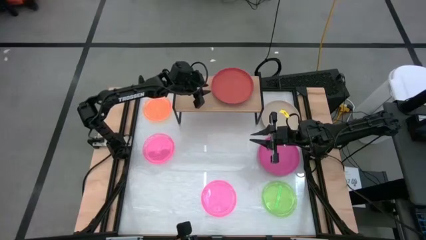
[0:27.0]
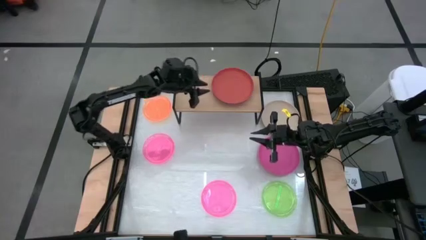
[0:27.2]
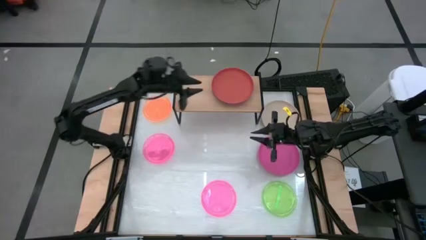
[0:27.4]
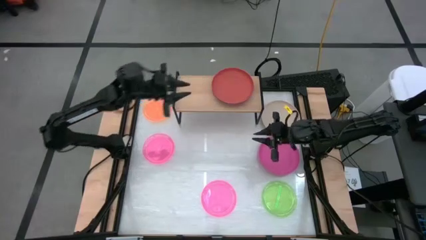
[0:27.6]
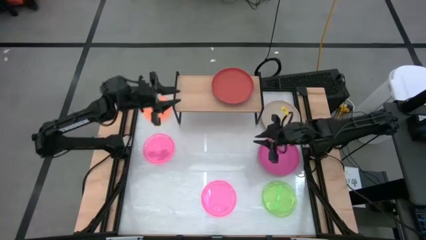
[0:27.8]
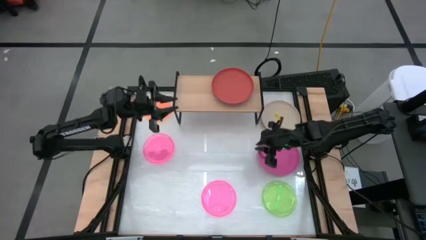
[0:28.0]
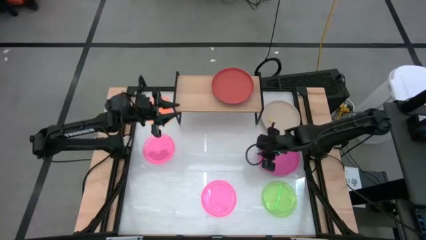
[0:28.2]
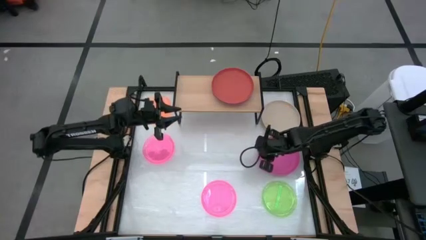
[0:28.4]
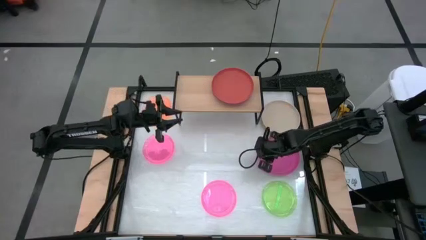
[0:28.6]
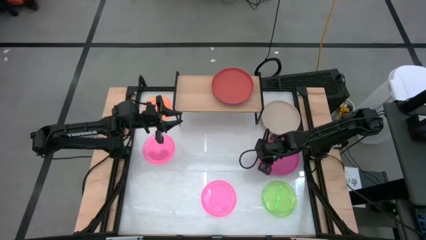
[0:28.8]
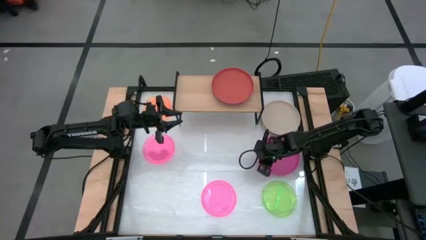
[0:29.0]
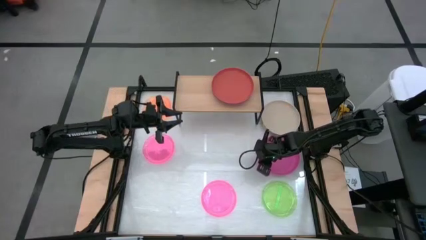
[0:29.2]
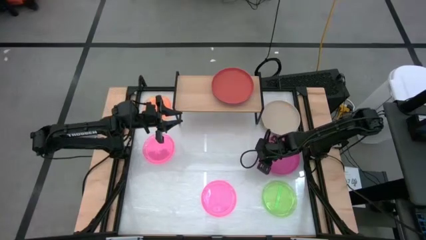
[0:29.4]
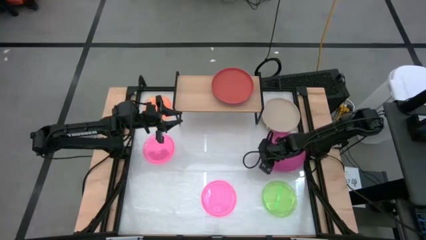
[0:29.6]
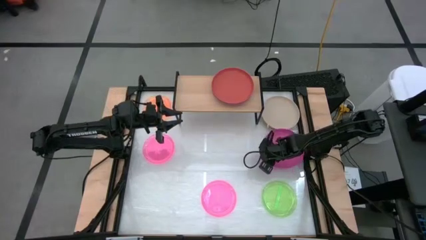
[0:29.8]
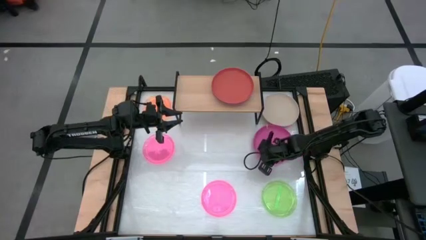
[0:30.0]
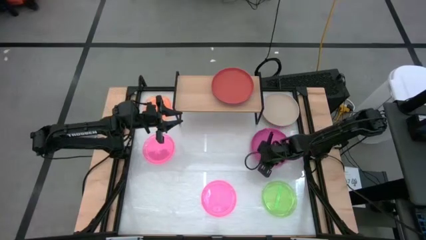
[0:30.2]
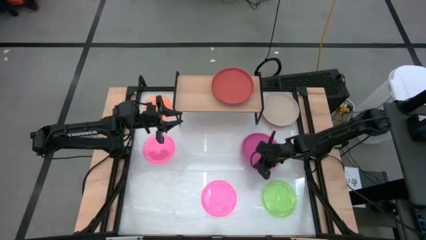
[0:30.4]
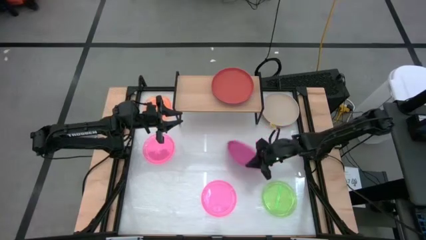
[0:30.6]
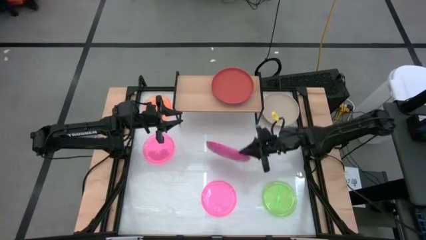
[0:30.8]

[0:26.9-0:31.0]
Task: Place and stack plates onto a shelf
Stack the top right pink plate on top of the orange plate on the shelf

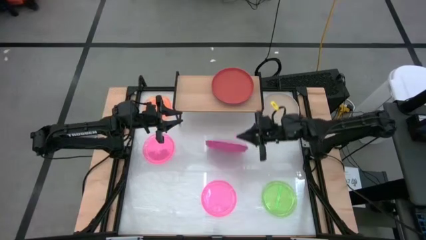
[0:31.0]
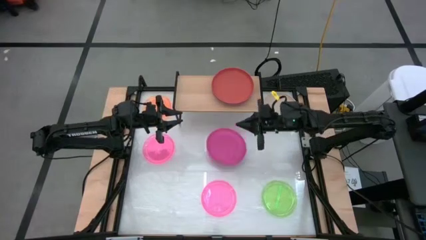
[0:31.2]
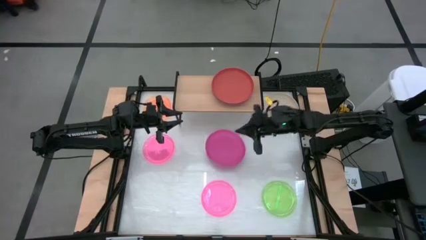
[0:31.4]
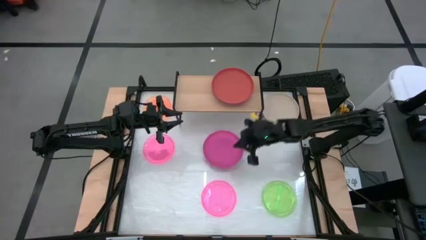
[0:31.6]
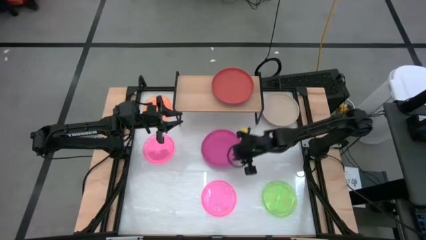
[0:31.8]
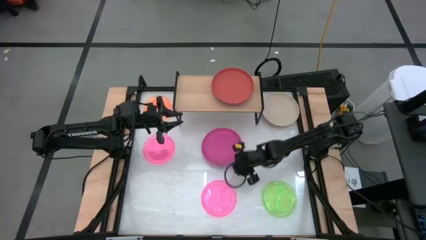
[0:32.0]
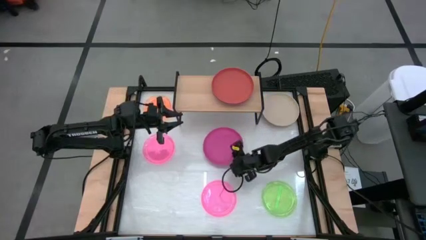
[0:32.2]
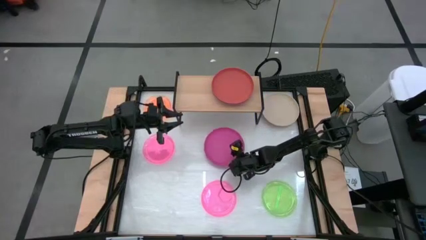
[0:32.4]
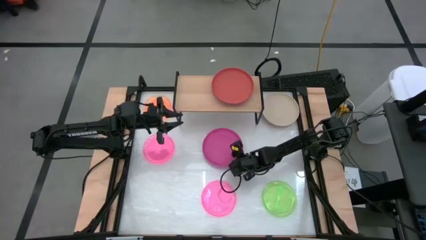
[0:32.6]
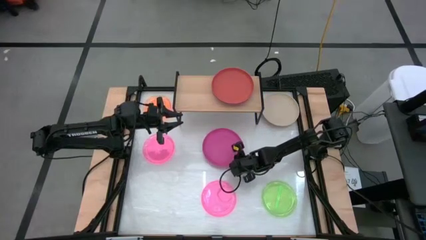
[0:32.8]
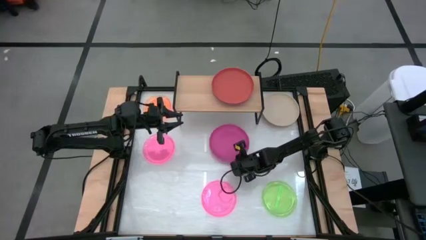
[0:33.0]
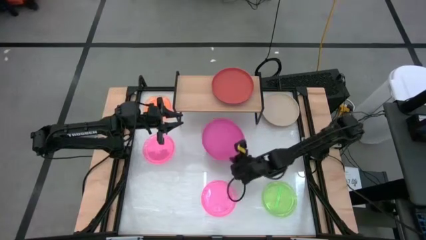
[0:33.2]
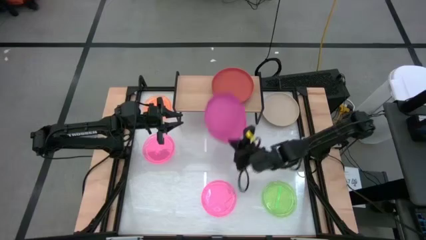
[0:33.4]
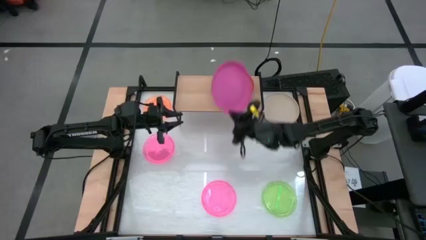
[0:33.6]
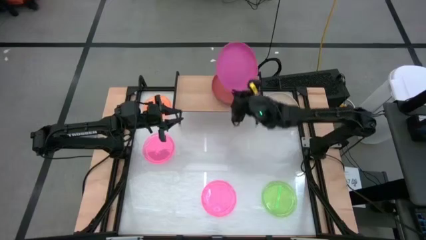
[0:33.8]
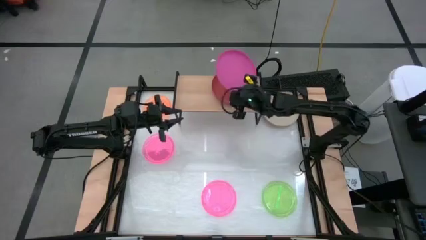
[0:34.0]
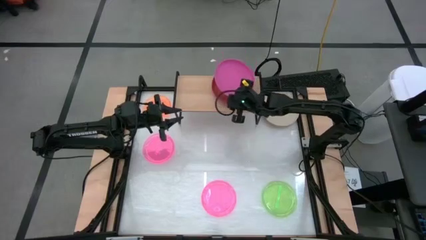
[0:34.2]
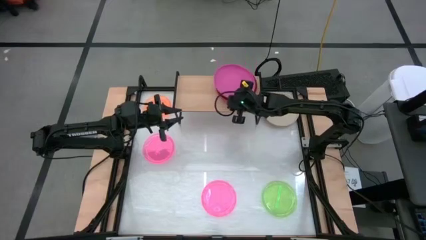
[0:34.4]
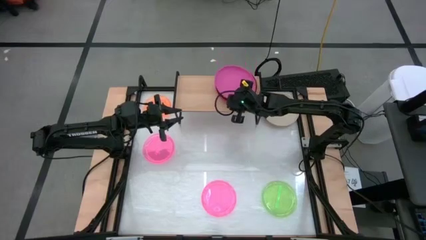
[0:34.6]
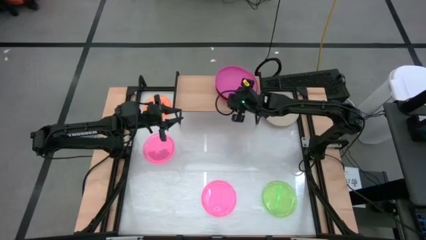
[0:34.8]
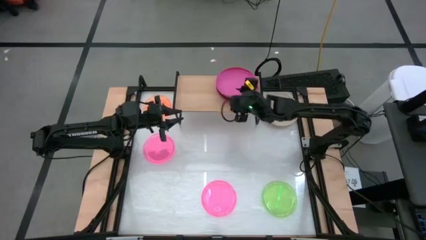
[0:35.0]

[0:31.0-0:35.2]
Stack the top right pink plate on top of the orange plate on the shelf

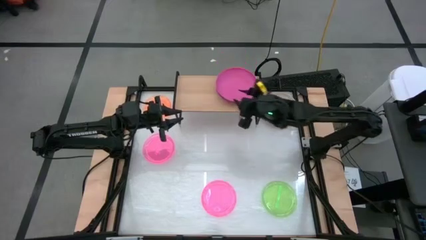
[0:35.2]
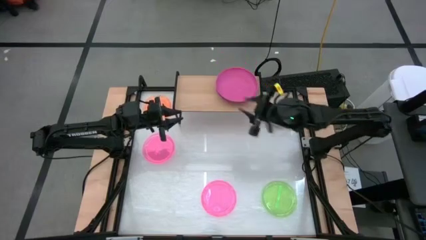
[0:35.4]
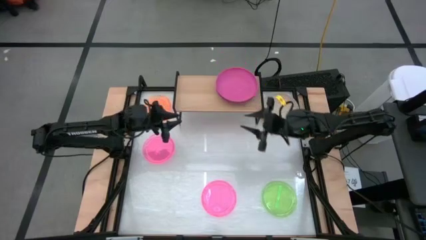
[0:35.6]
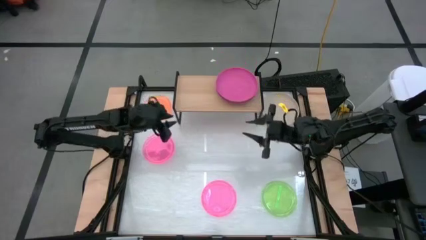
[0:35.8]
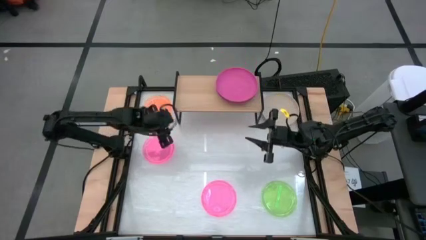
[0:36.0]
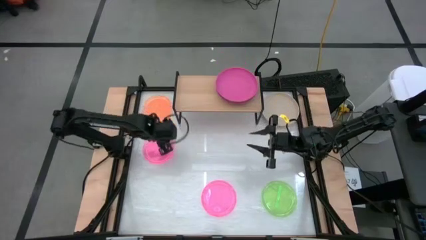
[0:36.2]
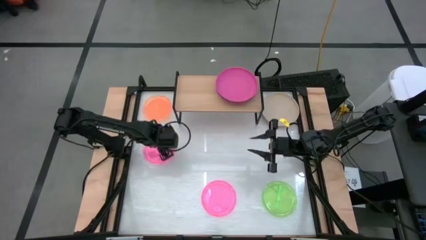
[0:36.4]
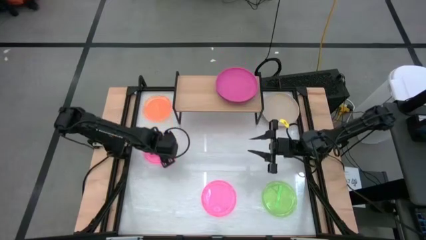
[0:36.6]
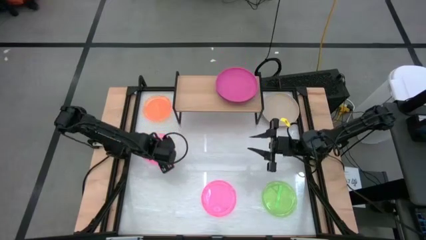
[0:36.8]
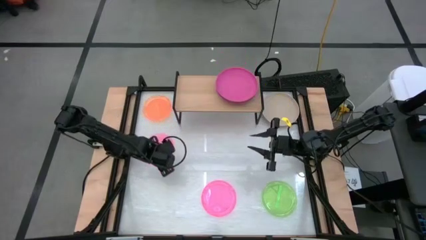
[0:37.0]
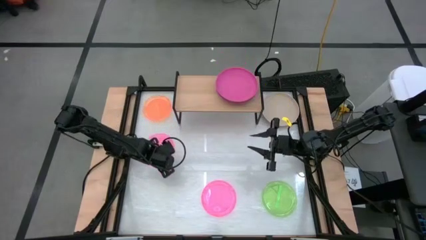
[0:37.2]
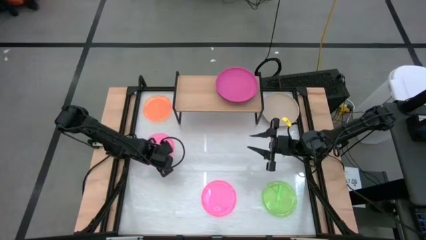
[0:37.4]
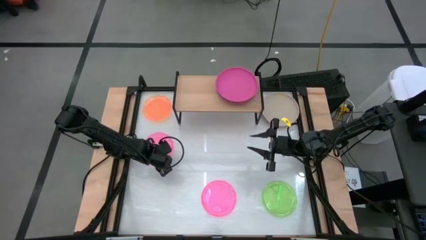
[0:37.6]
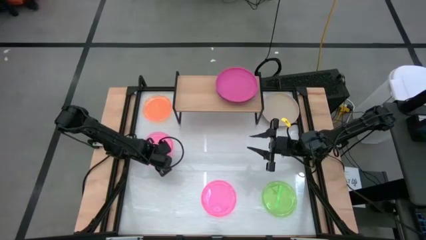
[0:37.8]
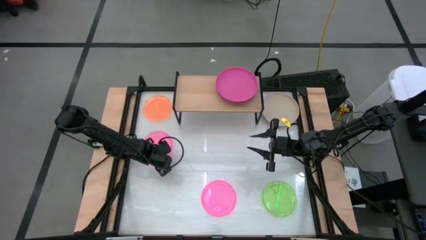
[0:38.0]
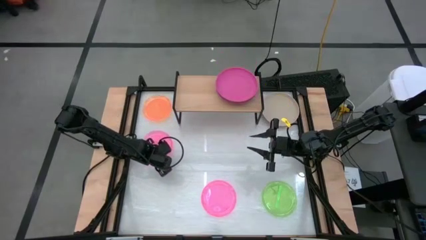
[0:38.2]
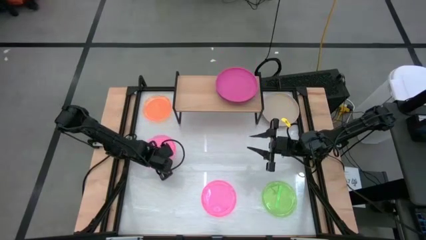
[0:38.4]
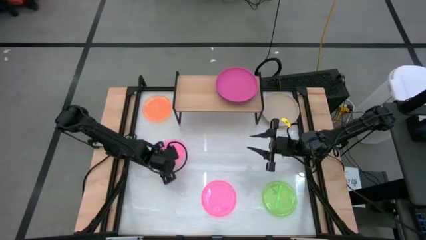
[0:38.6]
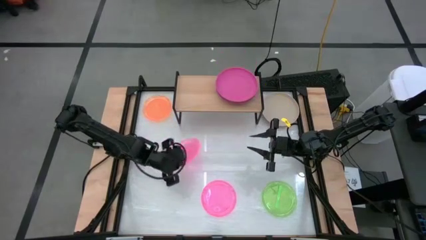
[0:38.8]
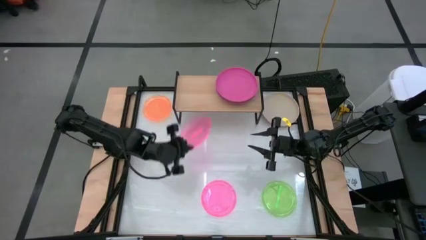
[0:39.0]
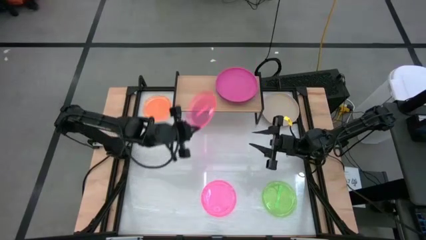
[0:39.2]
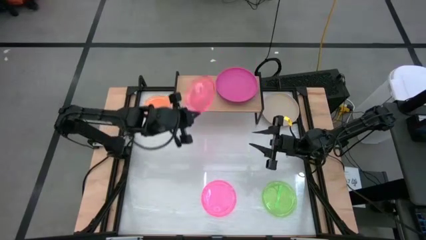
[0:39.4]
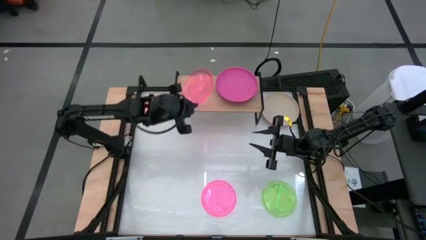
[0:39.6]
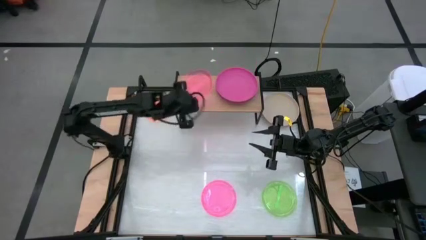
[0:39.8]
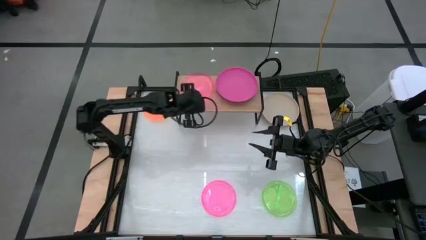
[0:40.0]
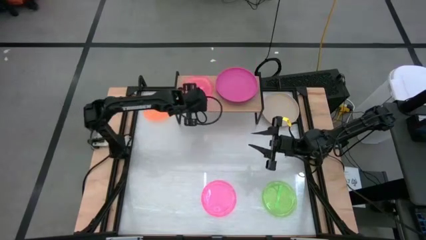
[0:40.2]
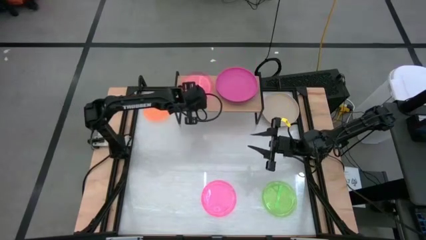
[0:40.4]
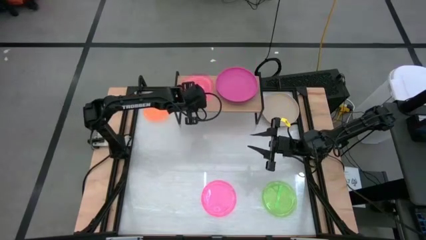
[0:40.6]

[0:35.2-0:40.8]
Put the left pink plate on the shelf

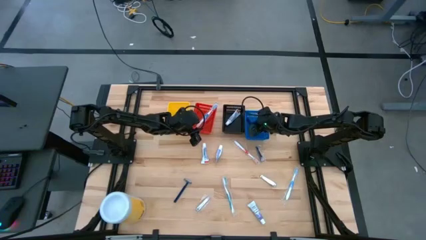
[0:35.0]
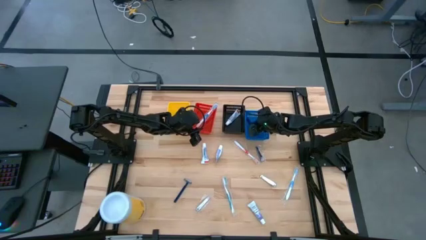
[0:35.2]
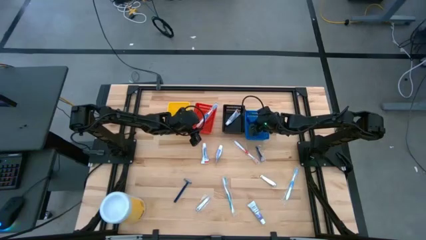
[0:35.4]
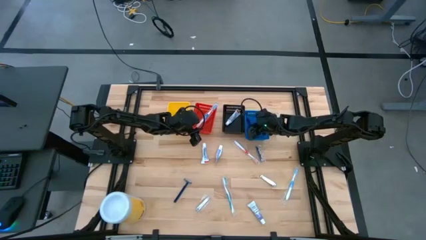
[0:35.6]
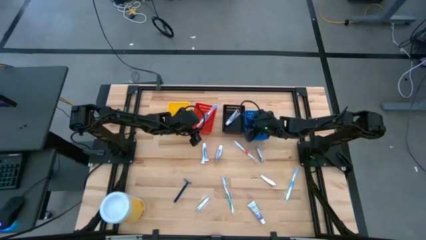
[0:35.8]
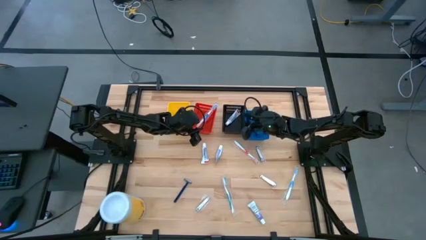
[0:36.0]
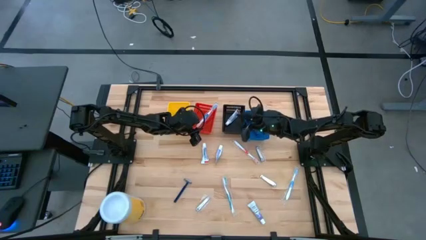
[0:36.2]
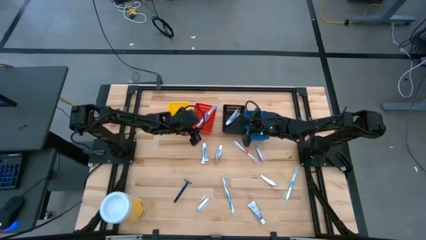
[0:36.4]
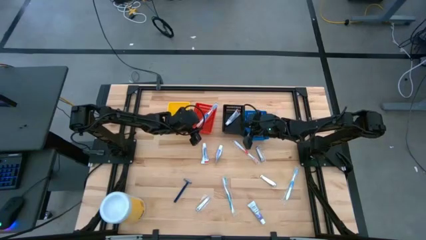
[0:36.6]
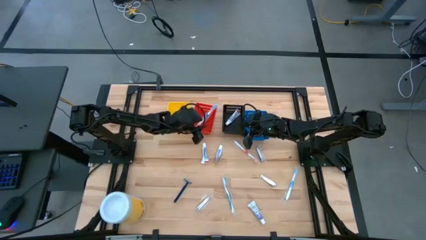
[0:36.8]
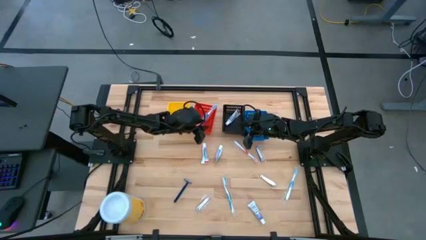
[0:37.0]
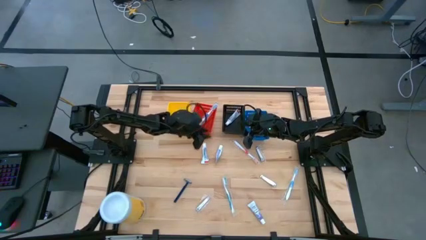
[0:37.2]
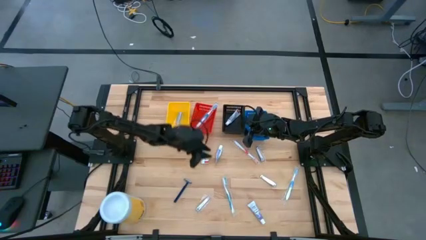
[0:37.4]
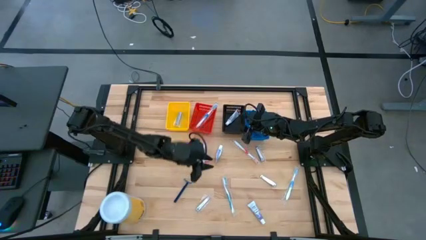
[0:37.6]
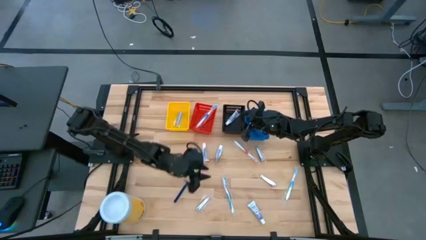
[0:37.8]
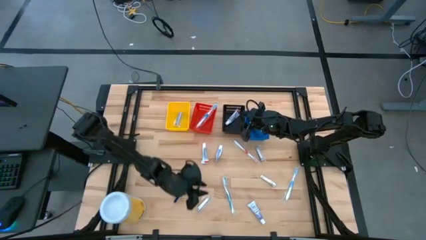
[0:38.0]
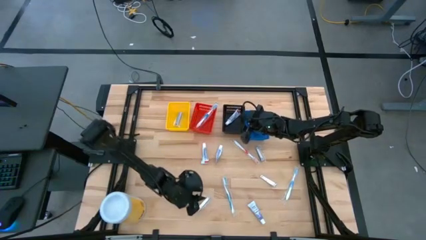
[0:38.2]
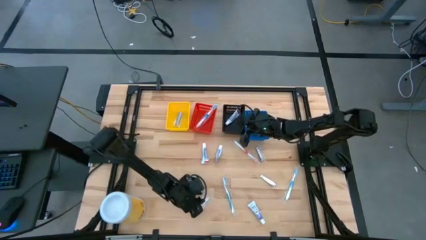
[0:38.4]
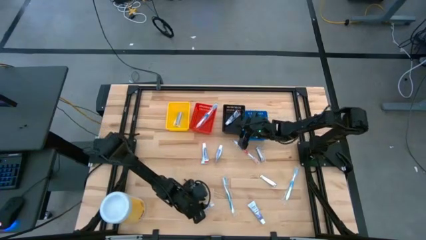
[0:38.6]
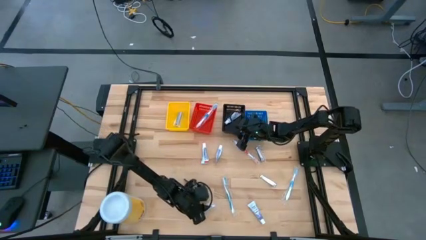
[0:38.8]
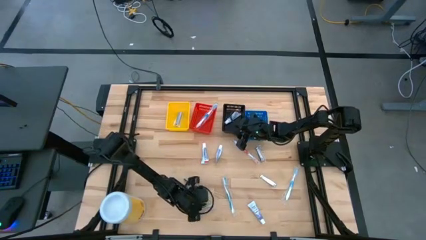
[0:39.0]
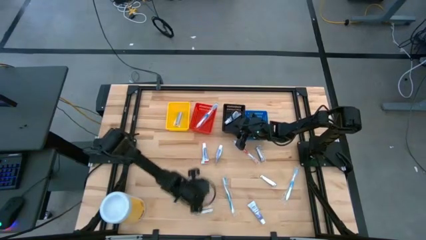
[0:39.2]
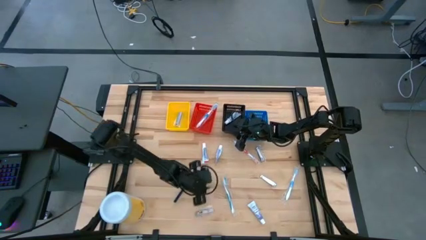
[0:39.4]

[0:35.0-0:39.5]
Task: Pick & Place Travel size toiletries
Put the silver nail cutter into the yellow bin
